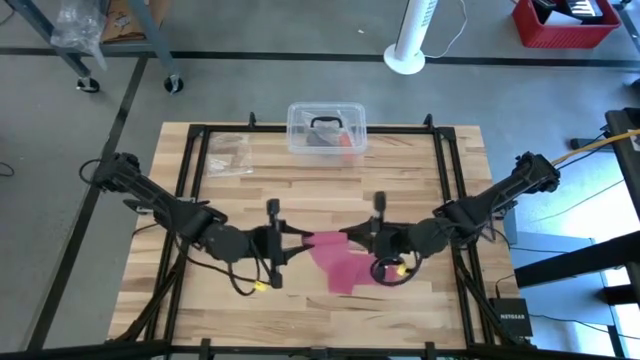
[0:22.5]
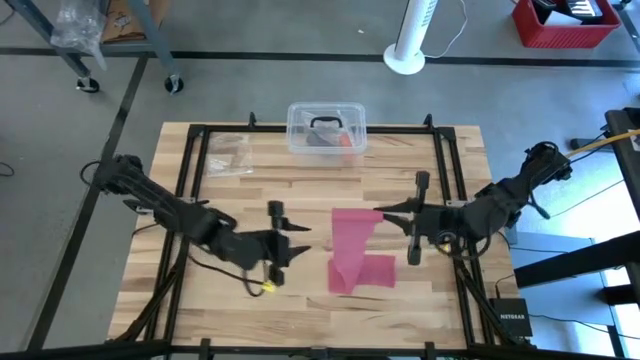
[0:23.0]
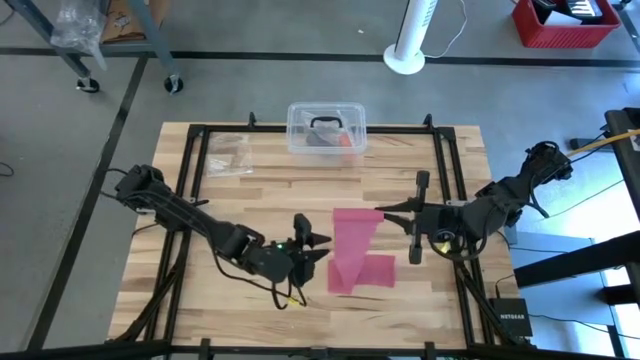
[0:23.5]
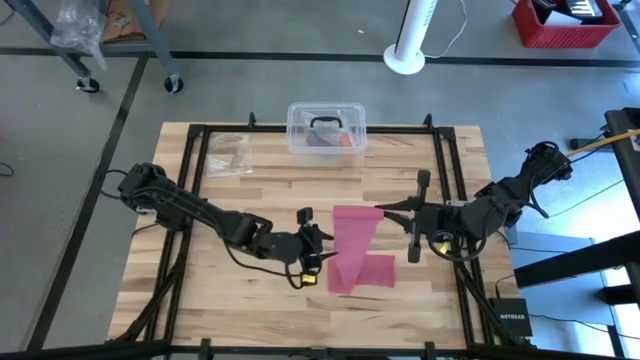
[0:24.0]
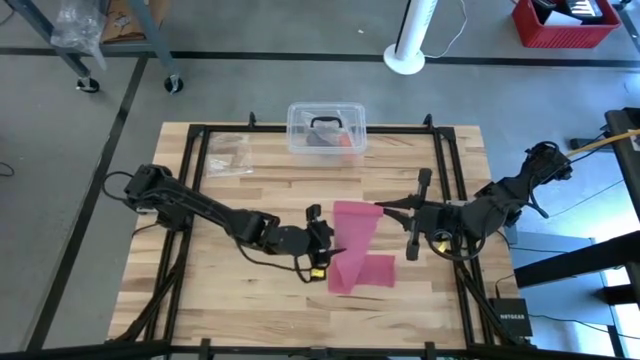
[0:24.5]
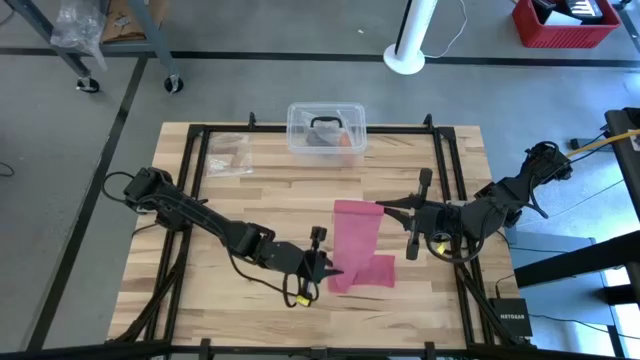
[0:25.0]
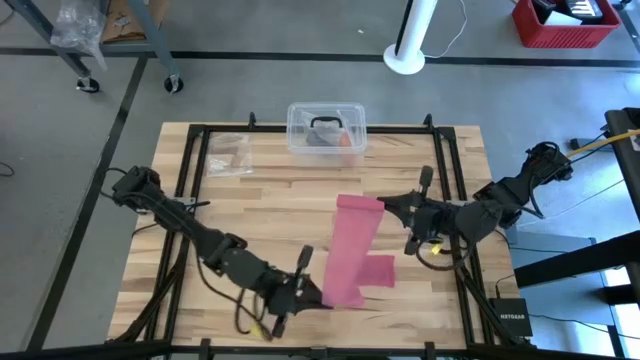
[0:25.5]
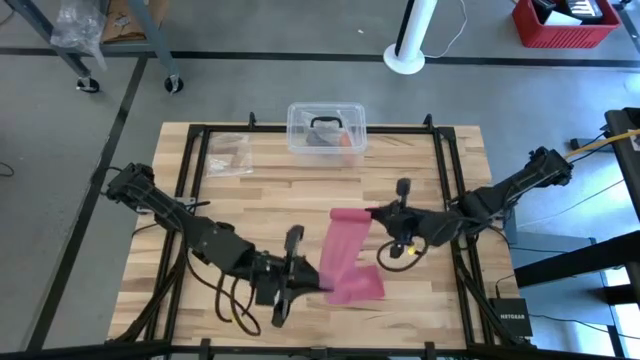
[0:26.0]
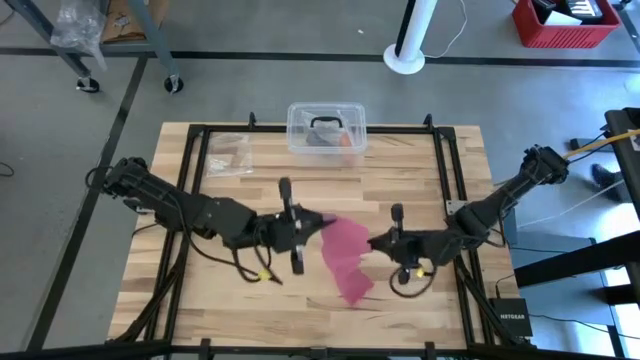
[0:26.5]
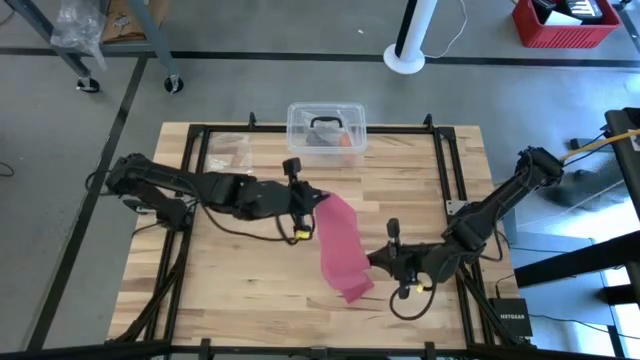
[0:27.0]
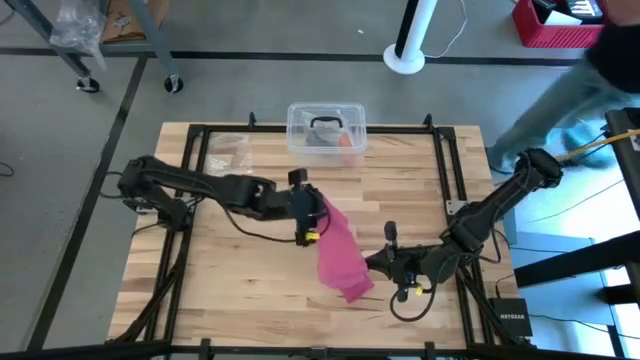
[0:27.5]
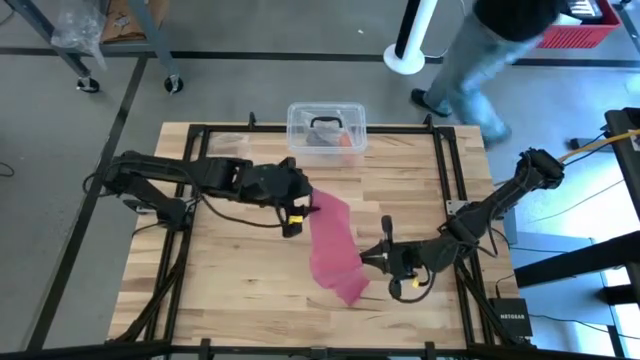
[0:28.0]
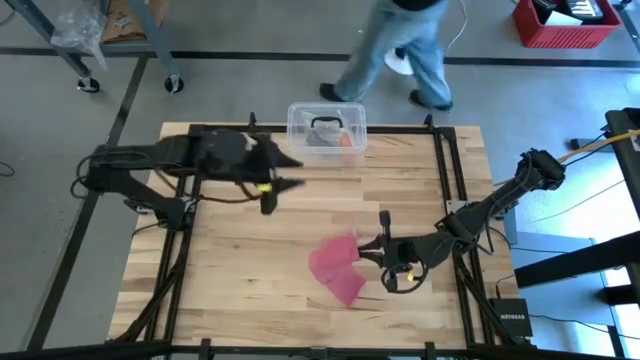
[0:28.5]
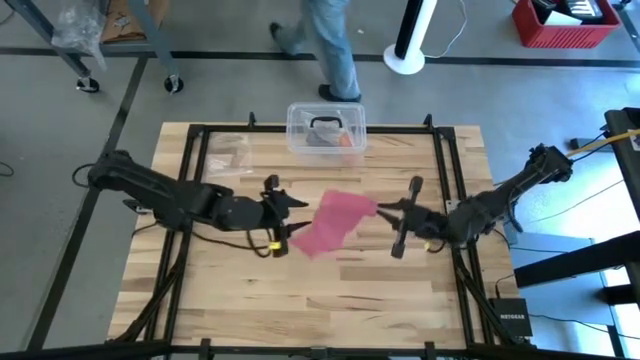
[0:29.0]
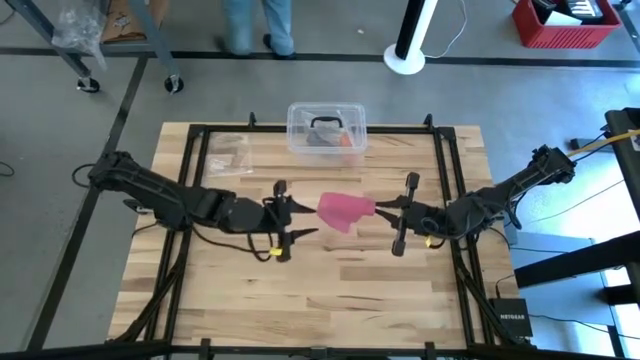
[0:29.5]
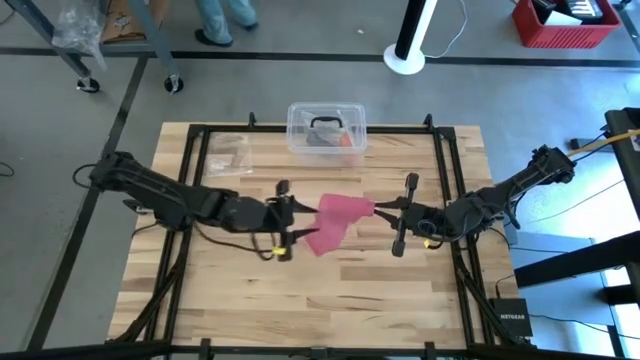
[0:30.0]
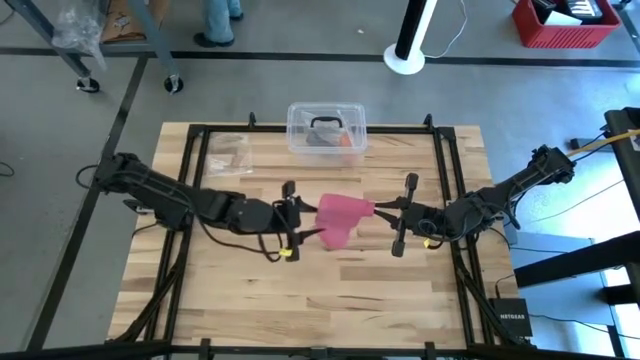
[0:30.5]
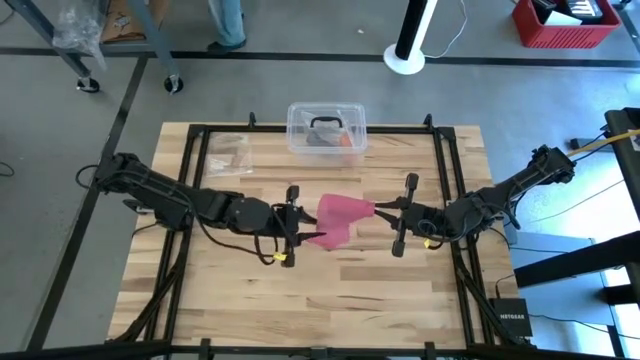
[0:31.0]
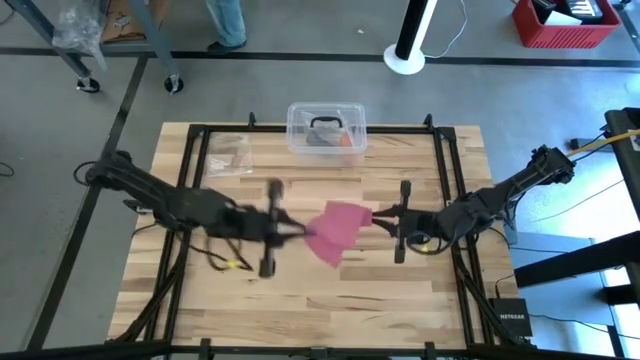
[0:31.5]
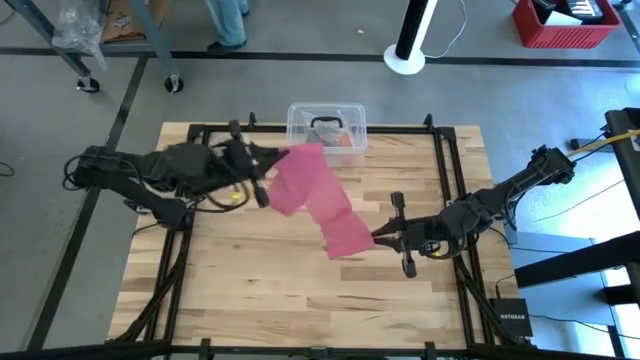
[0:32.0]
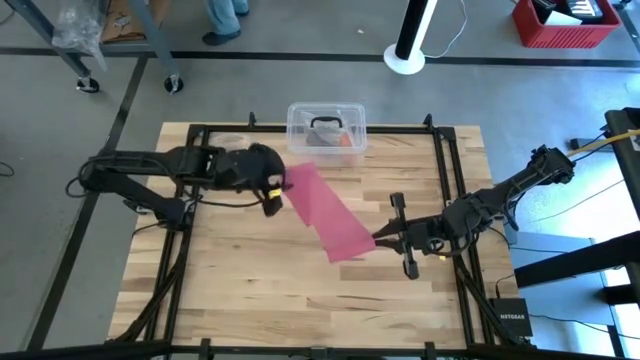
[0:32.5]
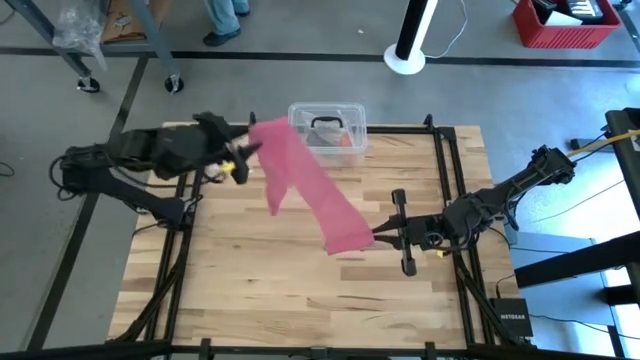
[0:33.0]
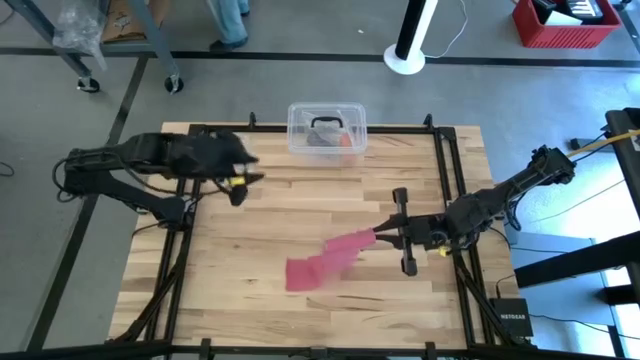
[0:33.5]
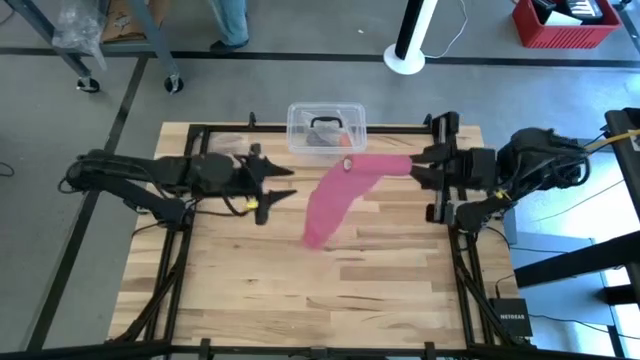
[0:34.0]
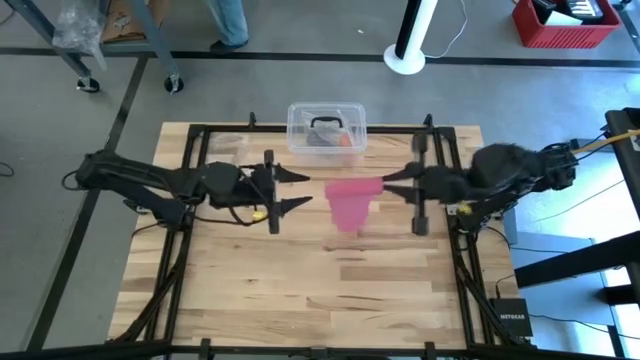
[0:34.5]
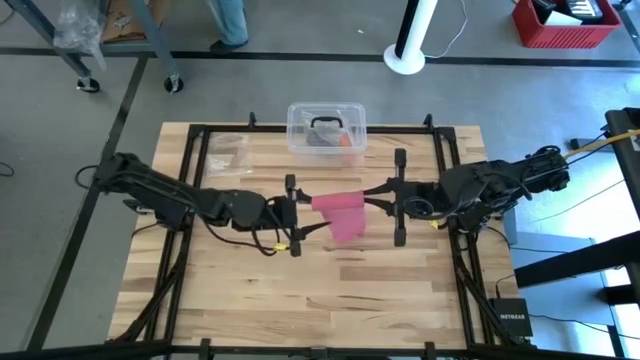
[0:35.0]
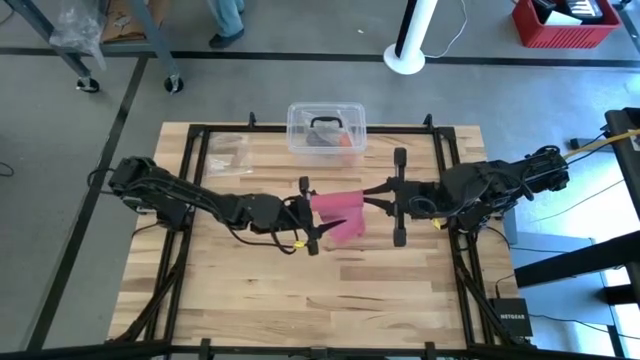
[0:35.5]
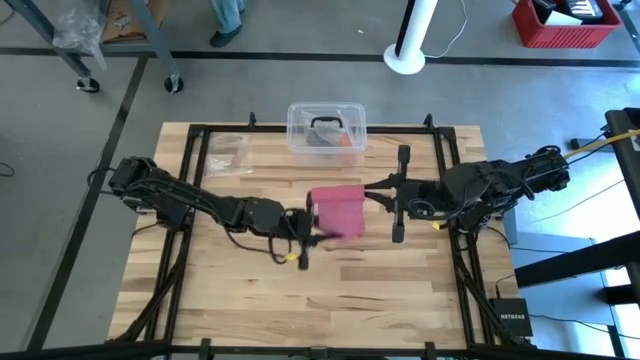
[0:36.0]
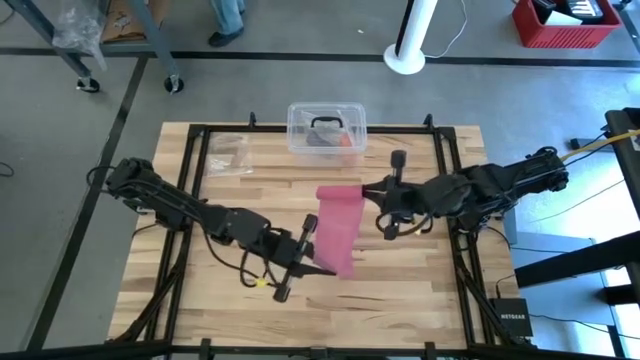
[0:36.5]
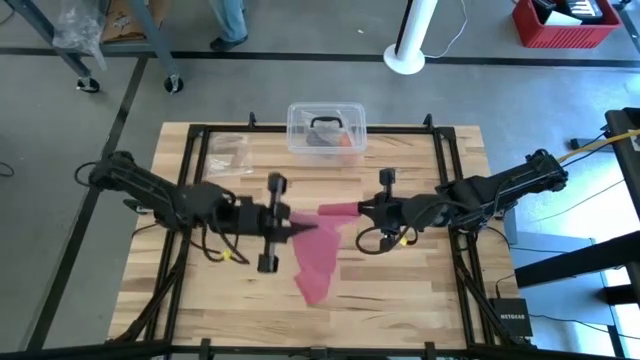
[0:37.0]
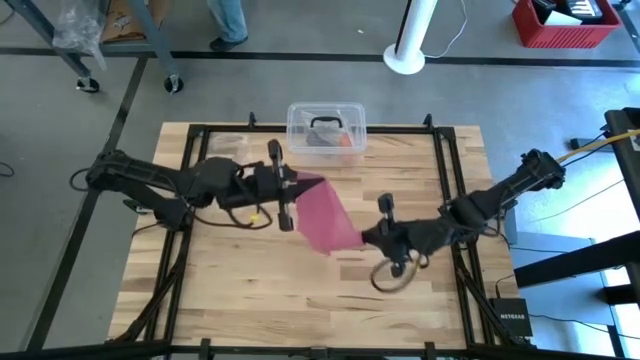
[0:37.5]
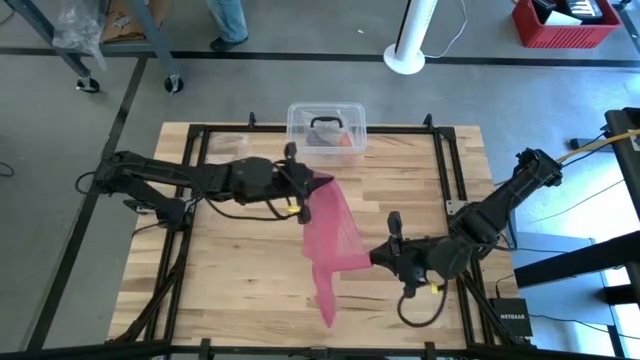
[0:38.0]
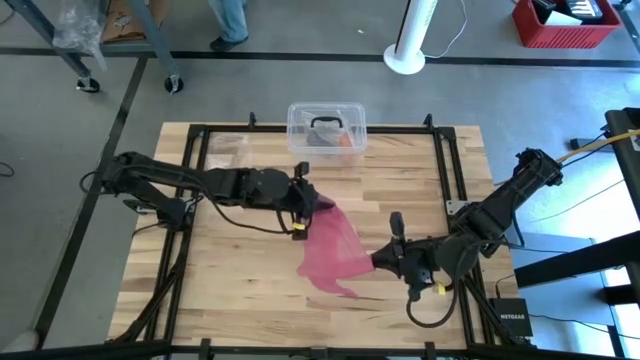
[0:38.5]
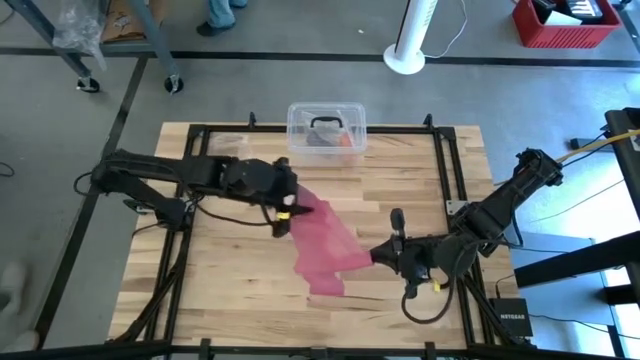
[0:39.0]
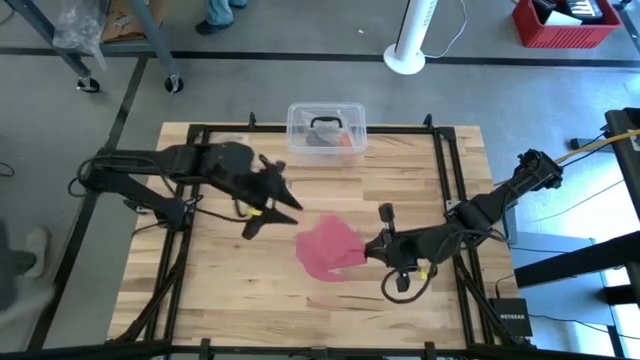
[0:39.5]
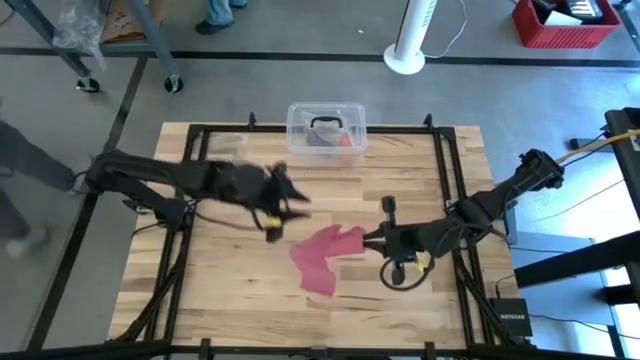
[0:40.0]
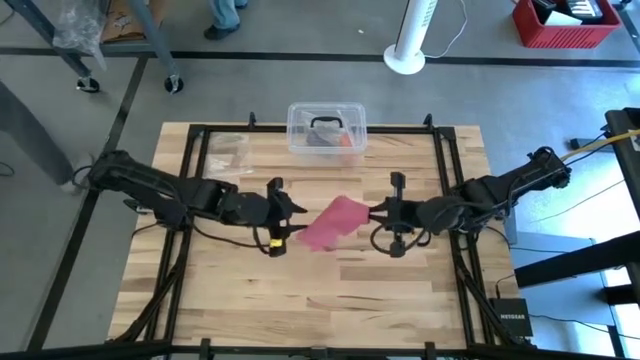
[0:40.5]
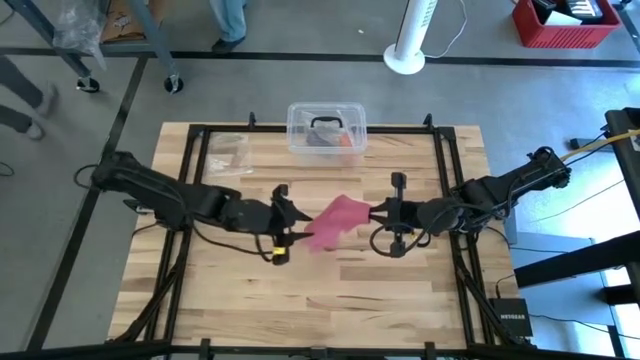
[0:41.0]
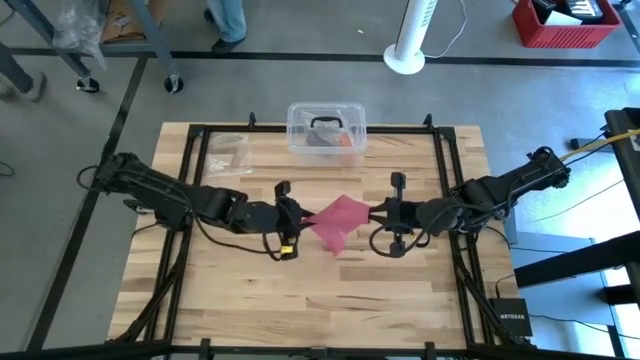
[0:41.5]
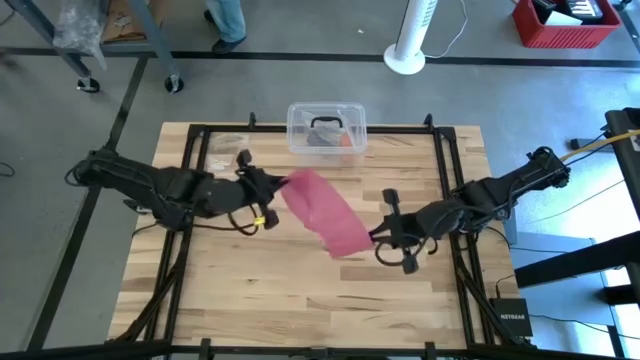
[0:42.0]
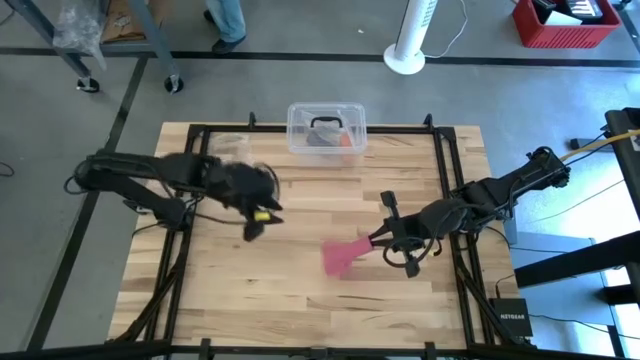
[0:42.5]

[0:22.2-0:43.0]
Task: Roll bandage
Roll the pink bandage
